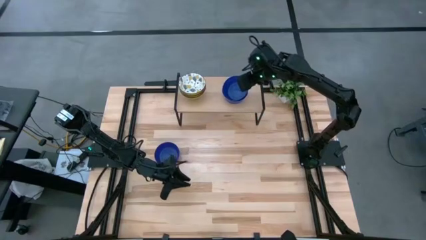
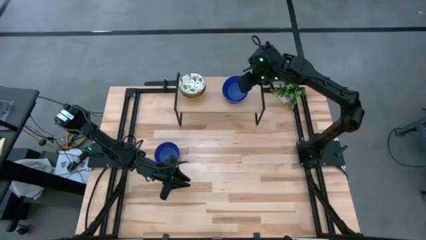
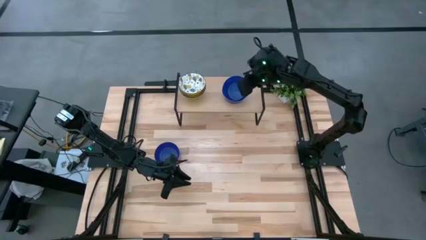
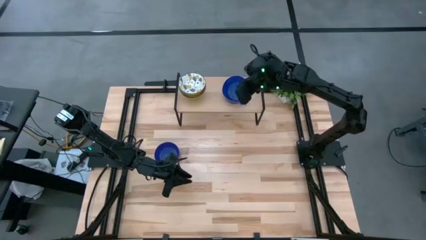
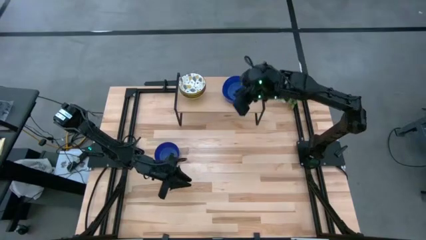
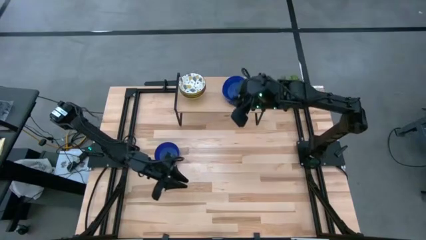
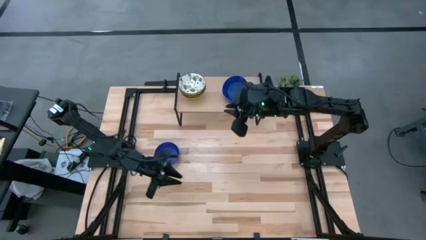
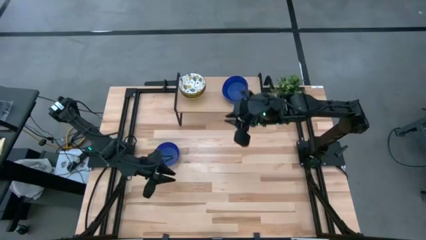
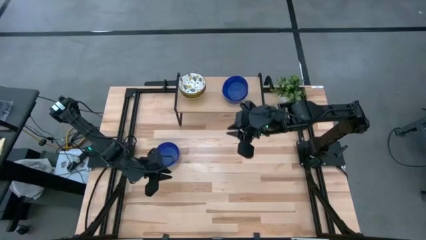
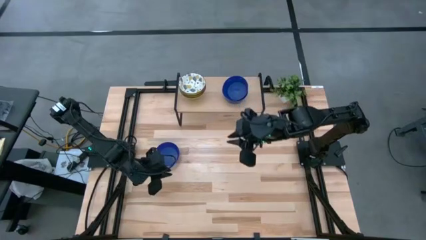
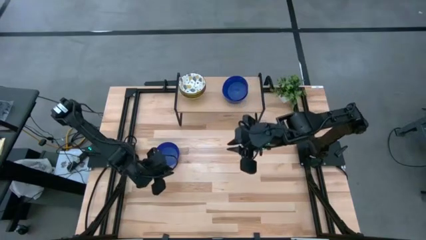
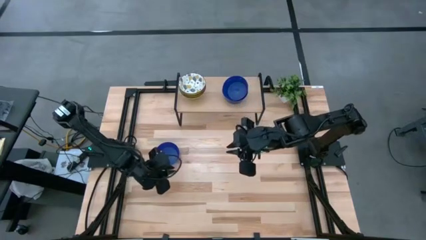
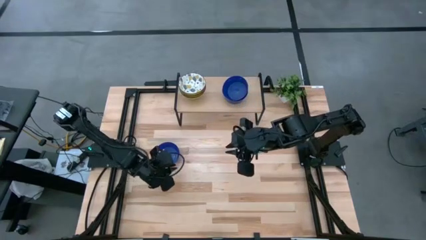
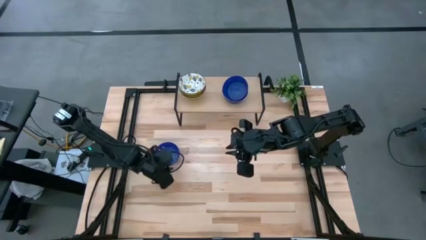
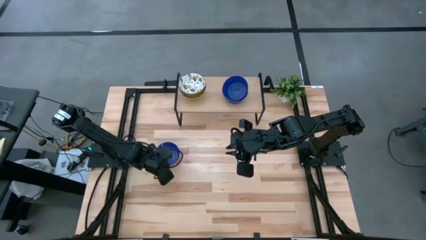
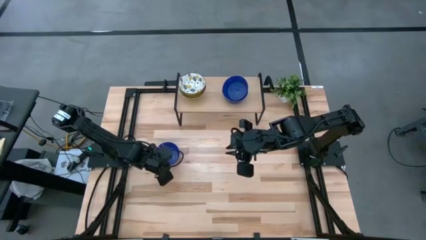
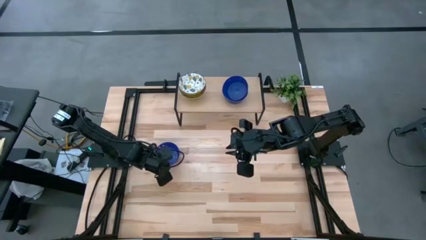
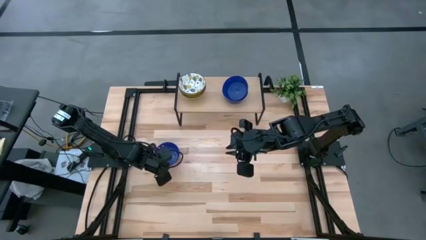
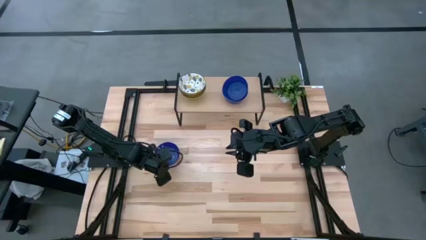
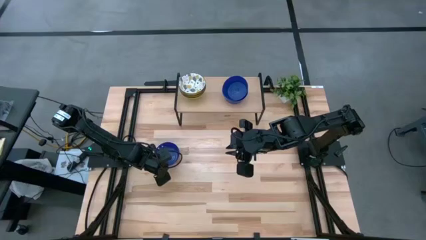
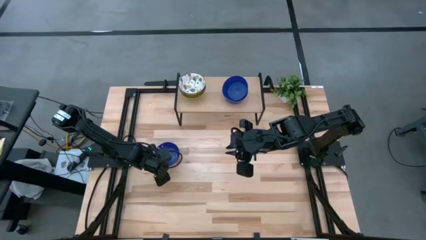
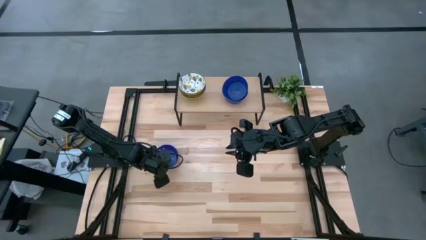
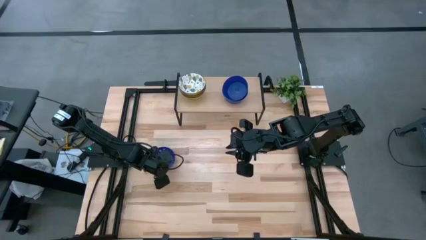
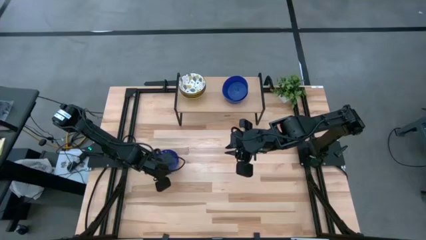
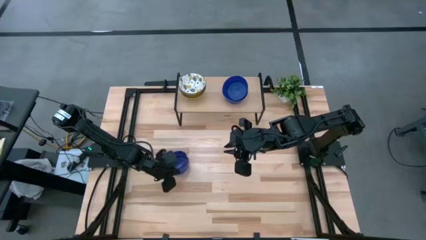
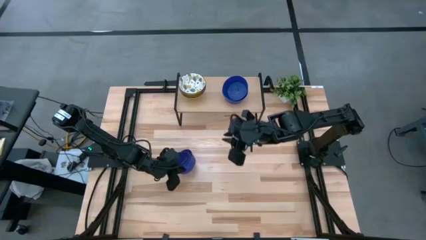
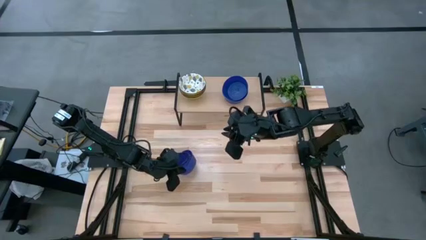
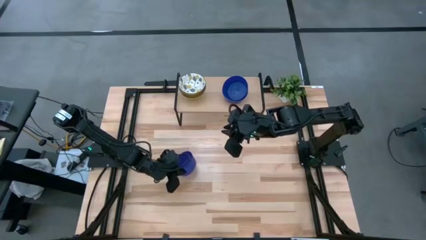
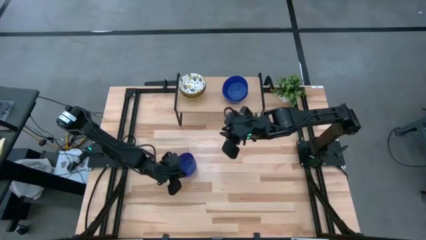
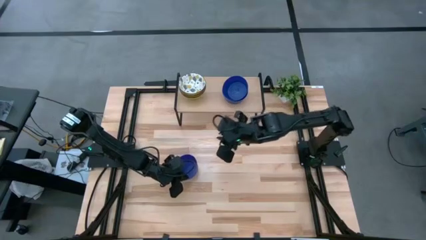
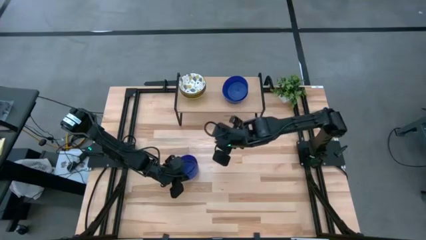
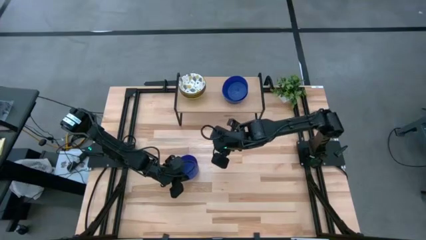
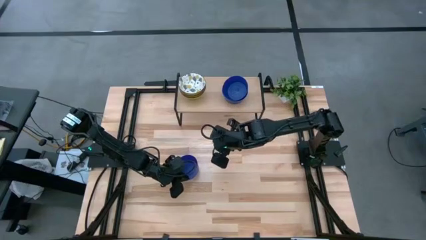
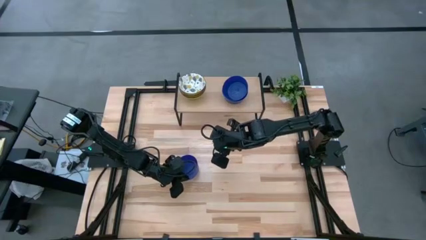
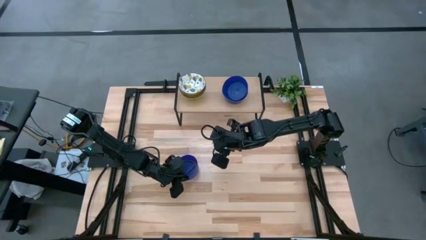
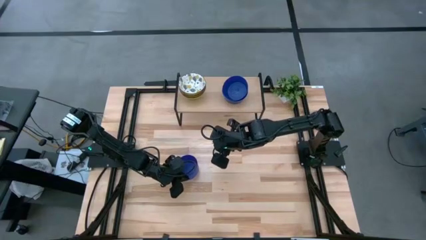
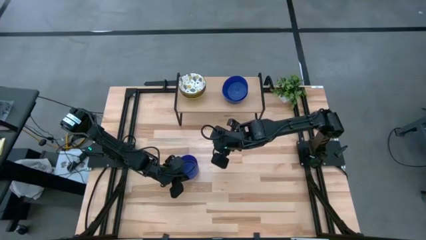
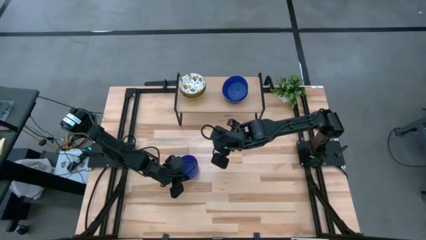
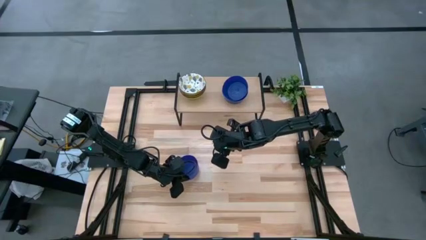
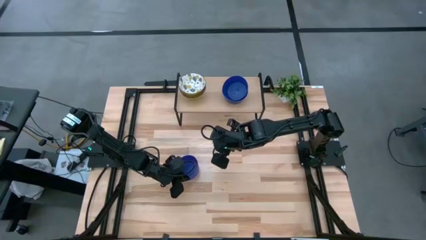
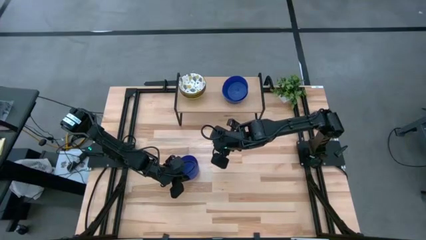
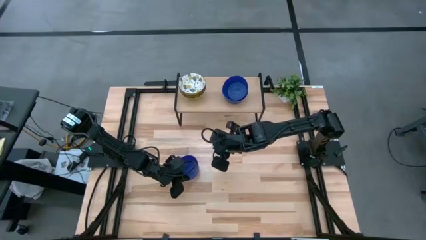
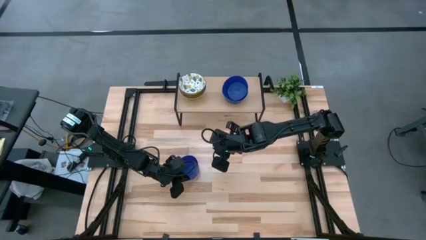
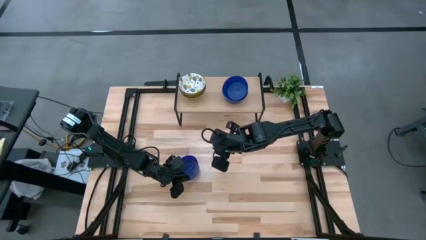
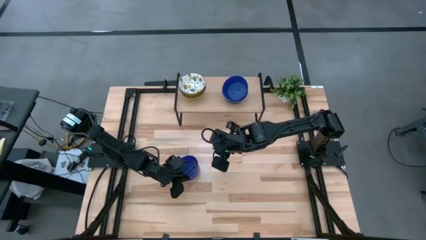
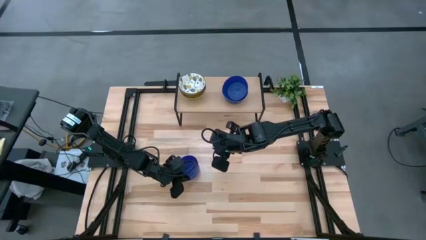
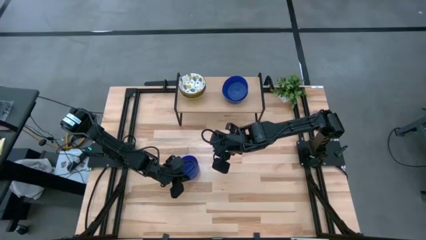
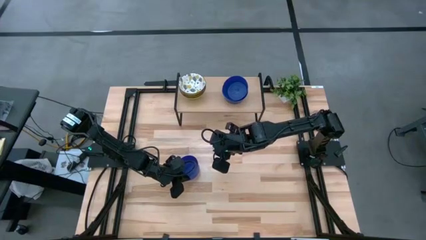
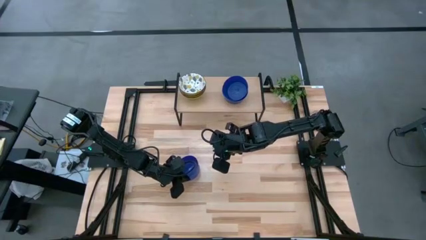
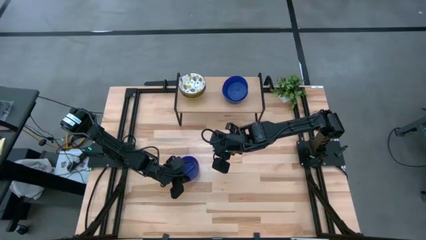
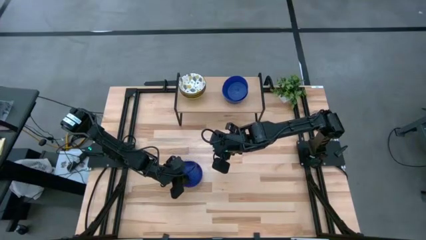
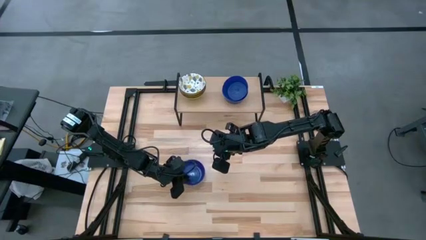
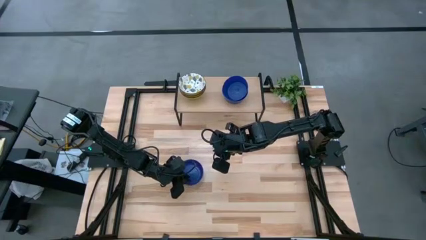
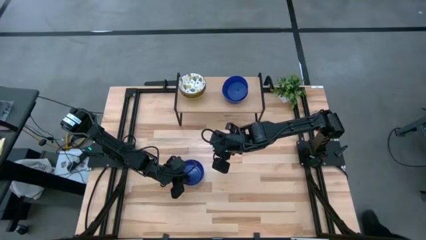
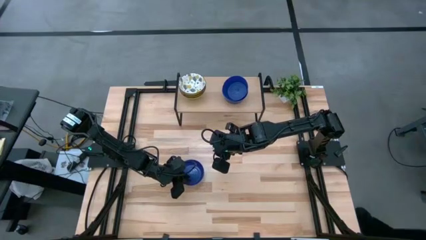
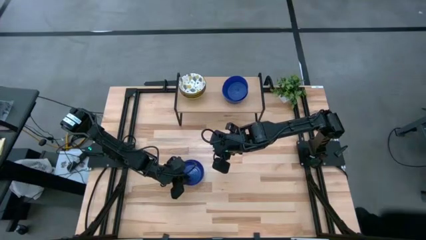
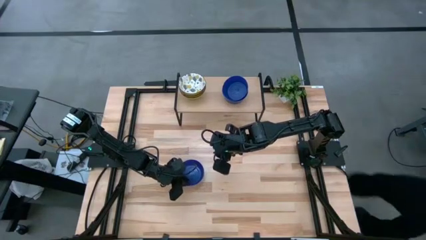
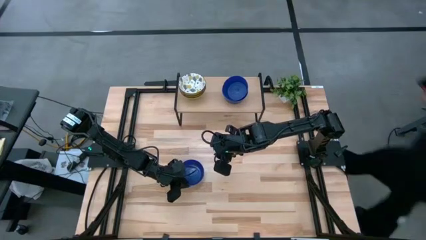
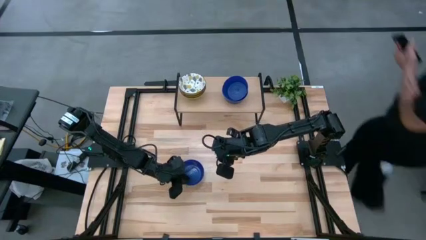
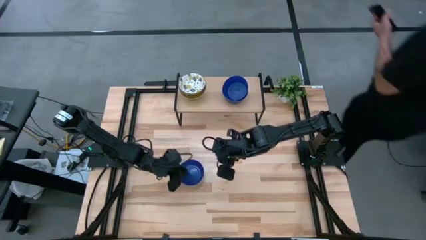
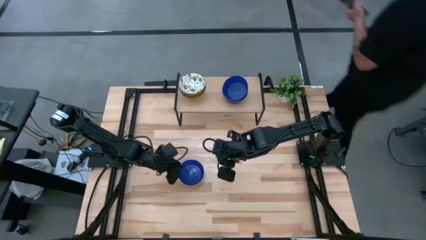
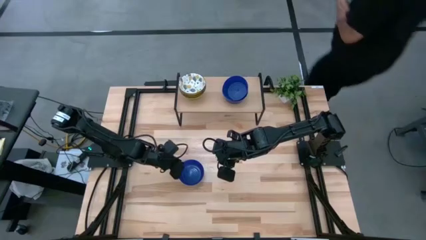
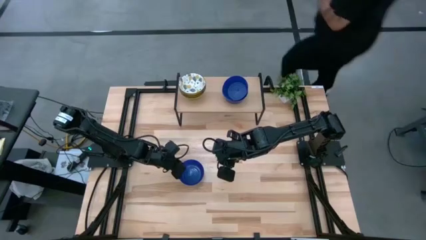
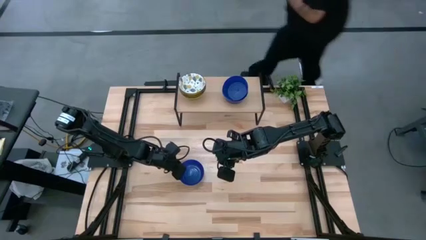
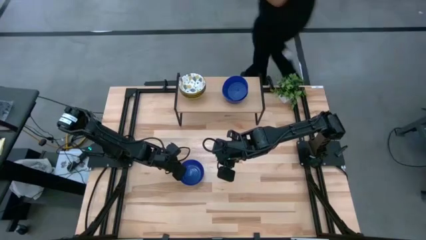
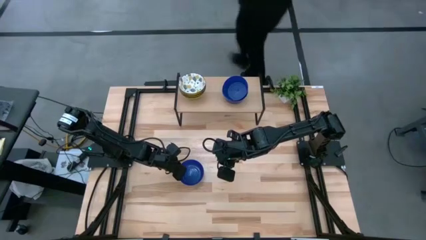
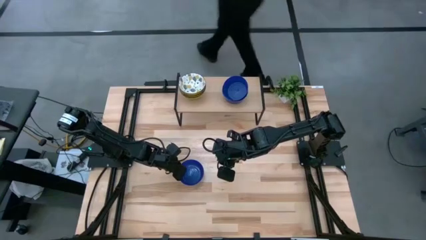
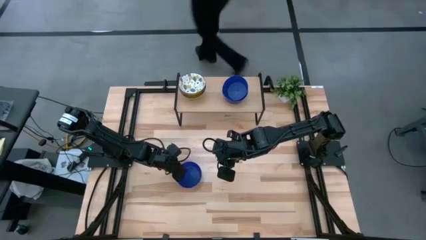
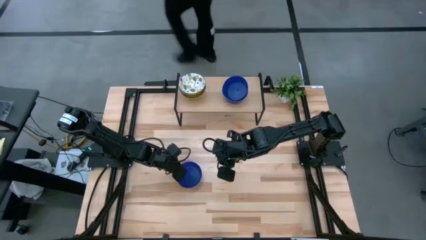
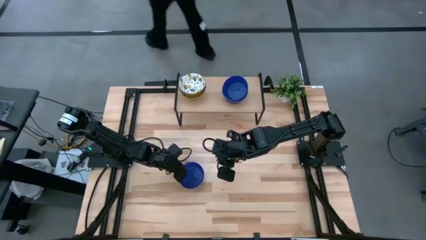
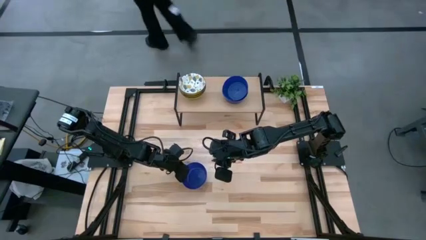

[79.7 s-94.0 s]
Task: Pick & Place Mini bowls
Stack the blue bowl on top of the blue bowl on the shelf
